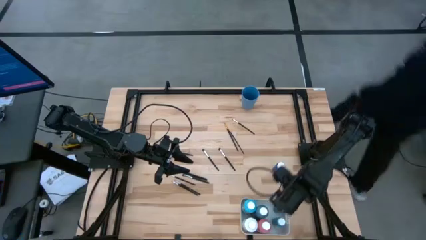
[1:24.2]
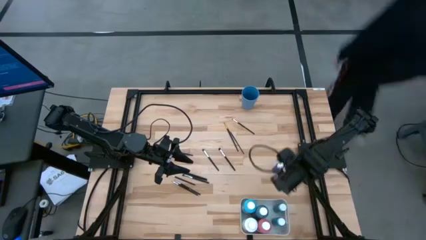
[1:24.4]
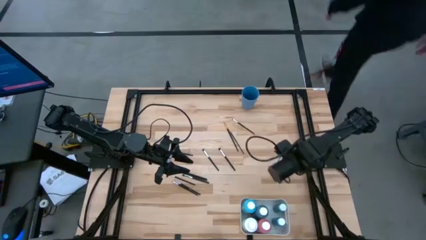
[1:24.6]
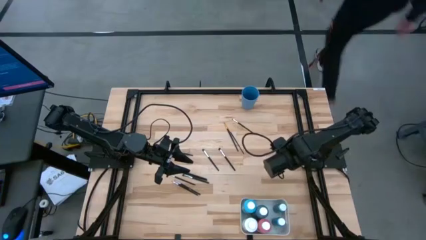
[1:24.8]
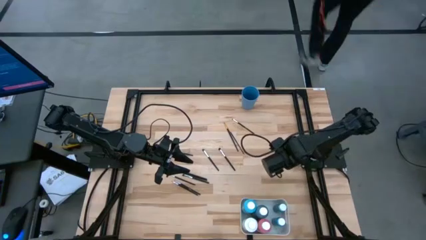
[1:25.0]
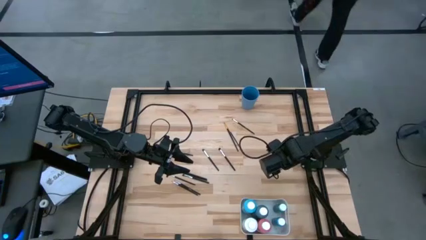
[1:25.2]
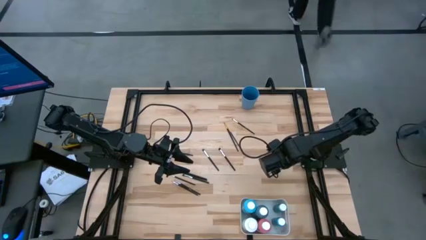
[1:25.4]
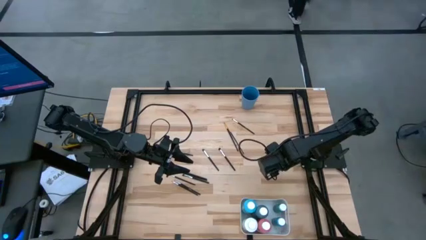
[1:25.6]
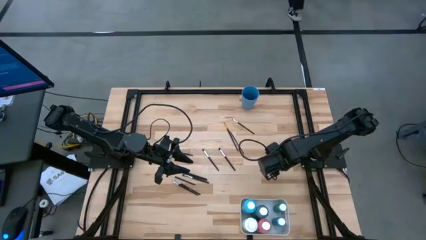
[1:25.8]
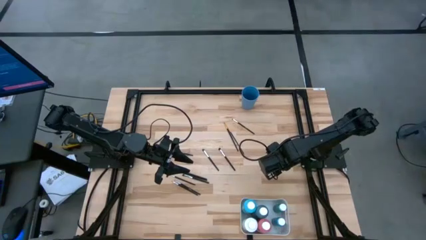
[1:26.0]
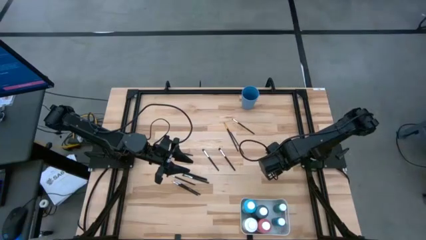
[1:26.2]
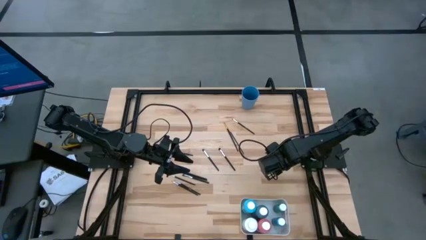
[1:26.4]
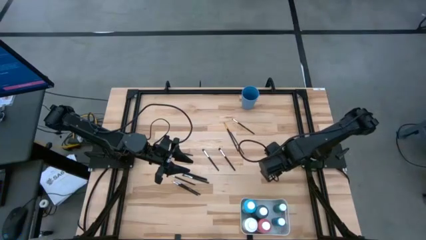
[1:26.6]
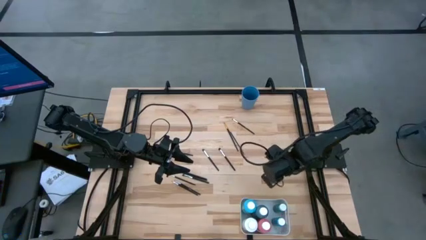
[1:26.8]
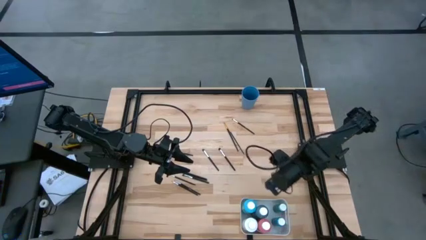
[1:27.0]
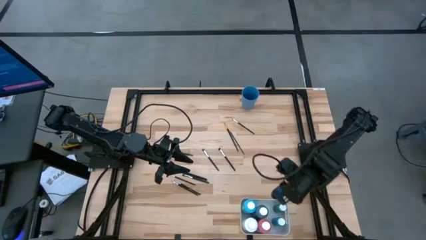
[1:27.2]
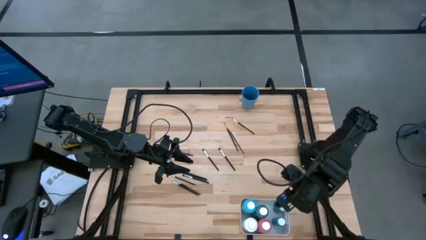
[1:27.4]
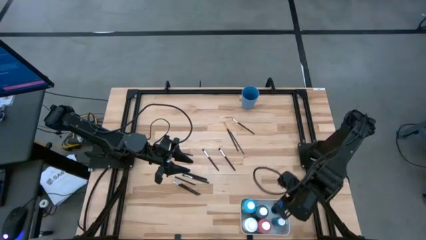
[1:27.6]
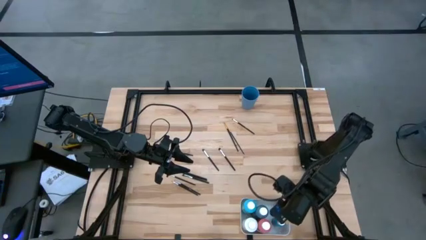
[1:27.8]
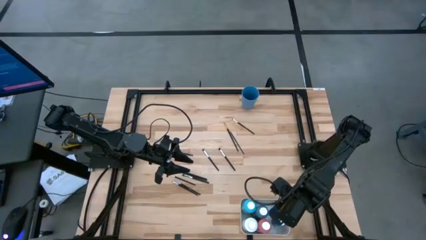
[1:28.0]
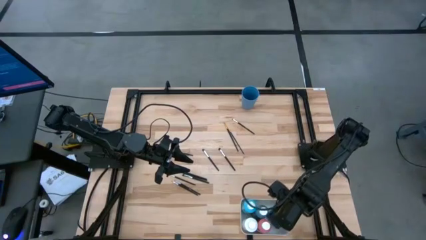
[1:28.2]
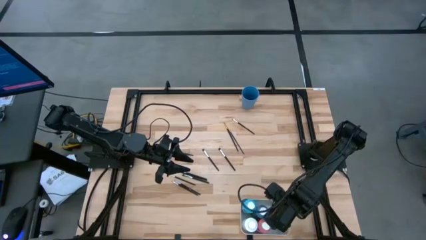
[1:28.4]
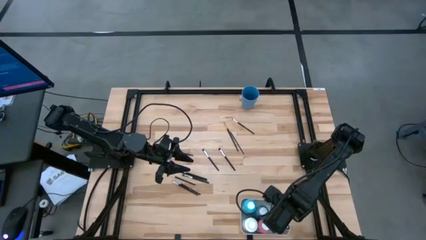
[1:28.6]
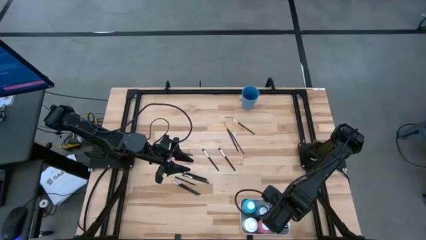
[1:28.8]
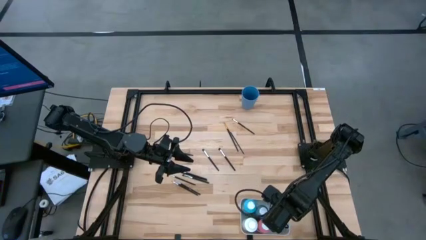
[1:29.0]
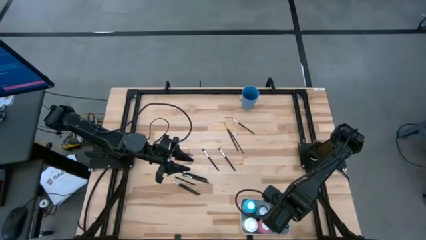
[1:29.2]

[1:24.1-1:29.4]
Task: Pick & Place Paint Supplies
Put the small blue paint bottle into the white bin

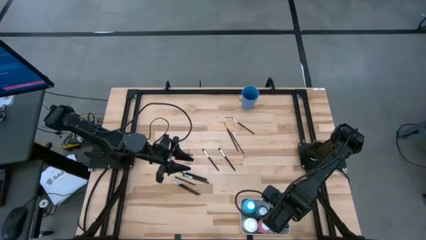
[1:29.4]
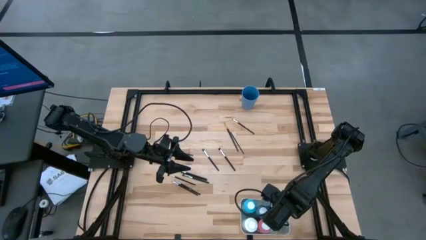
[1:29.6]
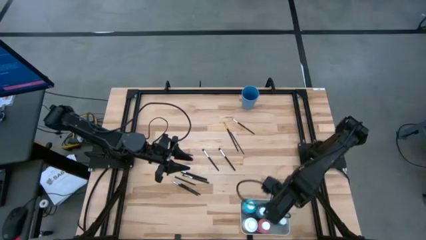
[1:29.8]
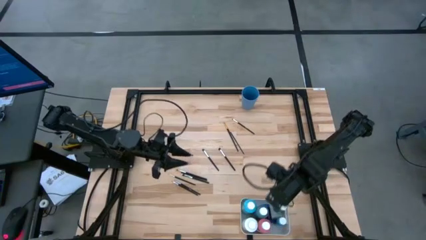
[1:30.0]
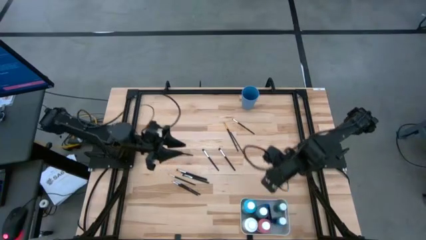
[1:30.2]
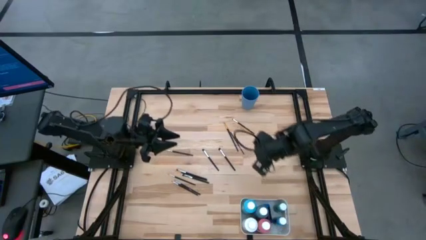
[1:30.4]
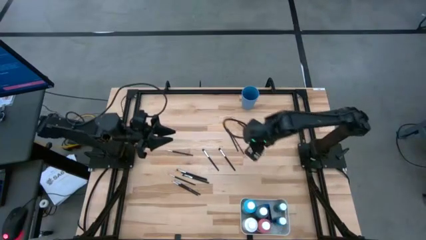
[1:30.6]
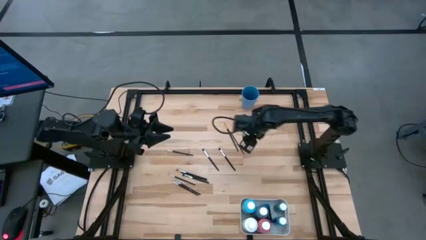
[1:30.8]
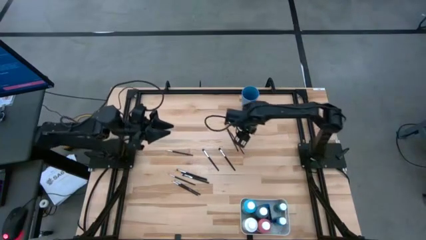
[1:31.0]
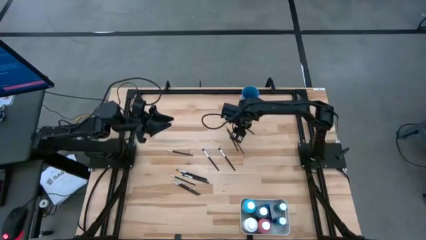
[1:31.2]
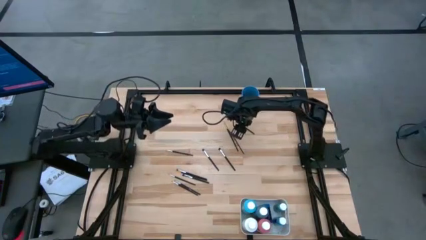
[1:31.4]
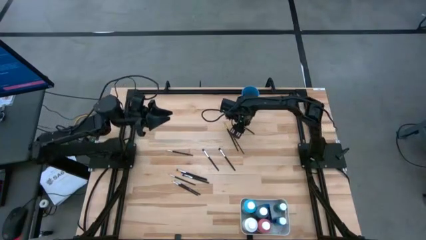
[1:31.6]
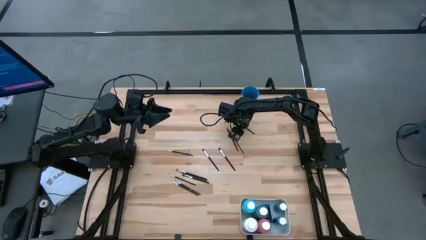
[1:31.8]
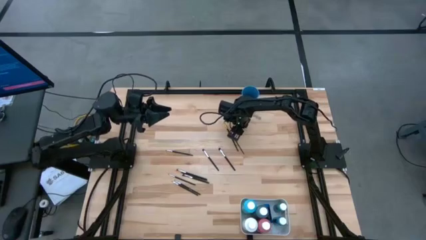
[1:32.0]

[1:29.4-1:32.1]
Put the silver paintbrush into the blue cup

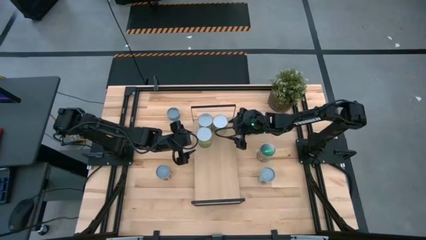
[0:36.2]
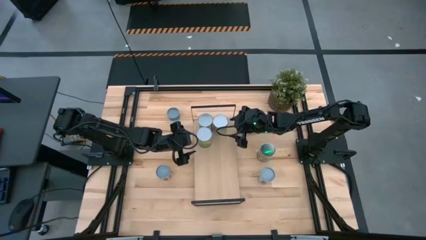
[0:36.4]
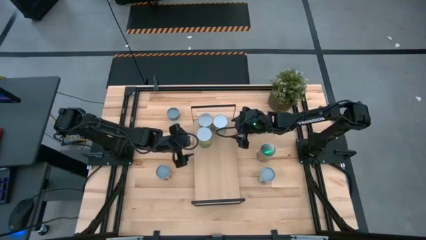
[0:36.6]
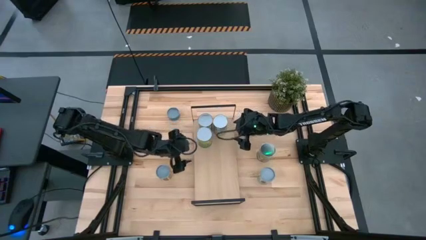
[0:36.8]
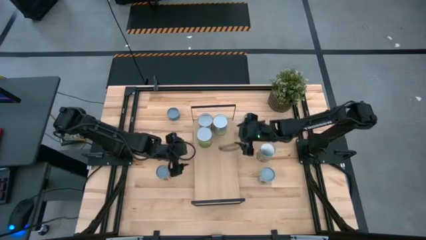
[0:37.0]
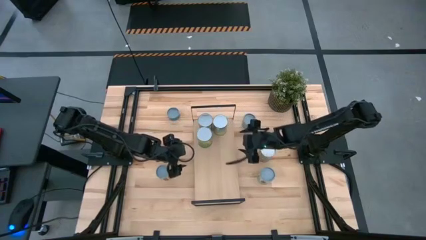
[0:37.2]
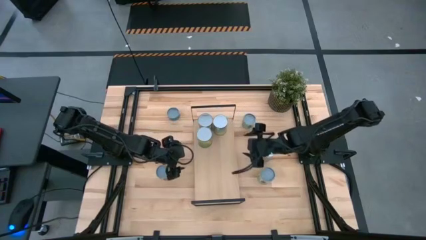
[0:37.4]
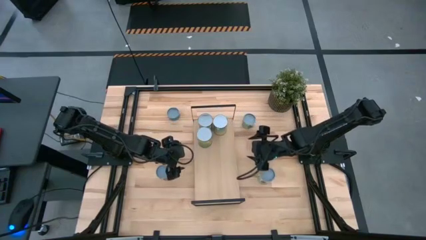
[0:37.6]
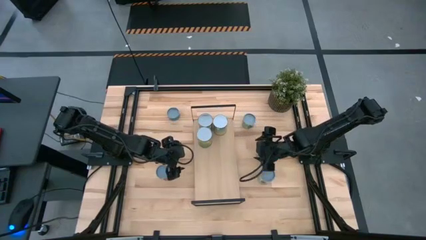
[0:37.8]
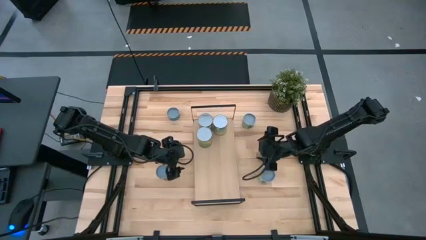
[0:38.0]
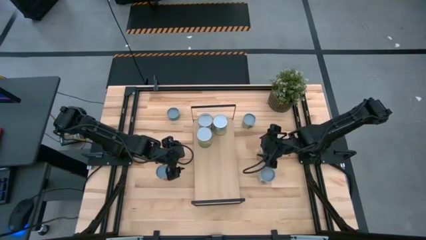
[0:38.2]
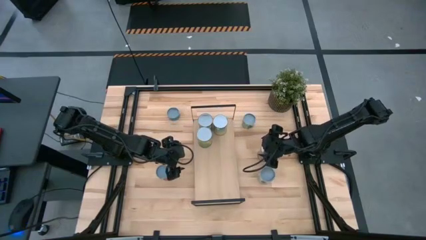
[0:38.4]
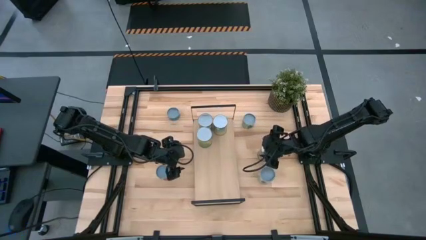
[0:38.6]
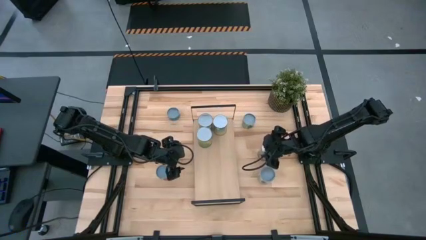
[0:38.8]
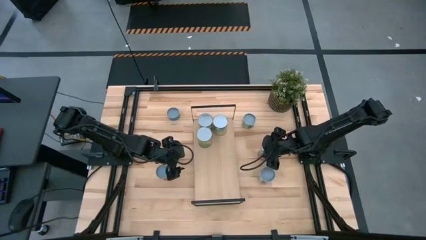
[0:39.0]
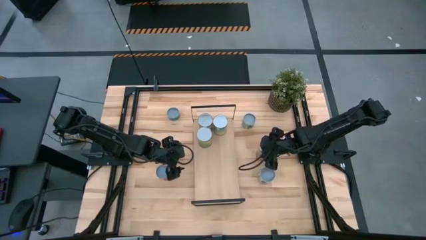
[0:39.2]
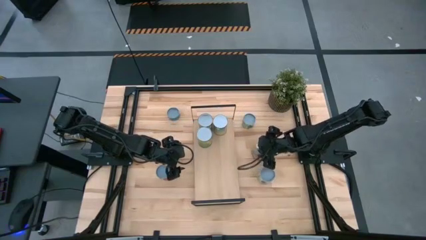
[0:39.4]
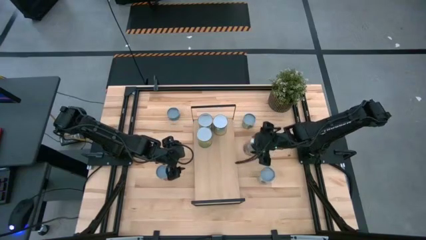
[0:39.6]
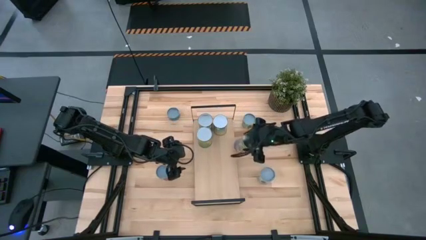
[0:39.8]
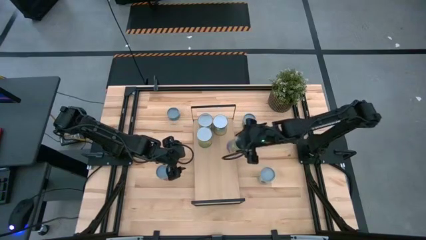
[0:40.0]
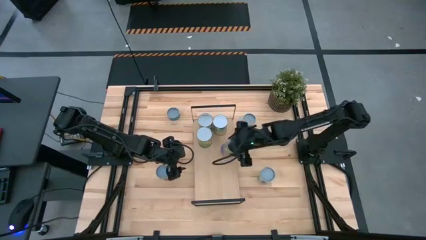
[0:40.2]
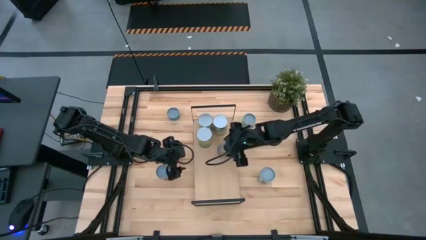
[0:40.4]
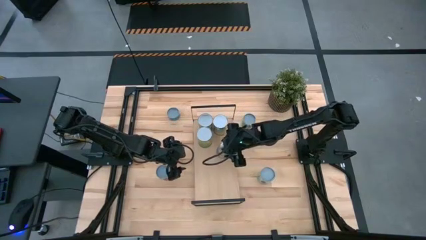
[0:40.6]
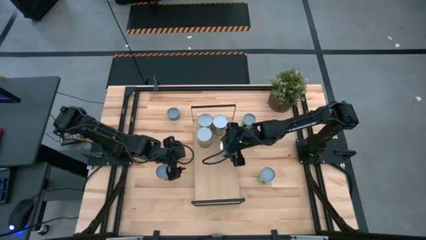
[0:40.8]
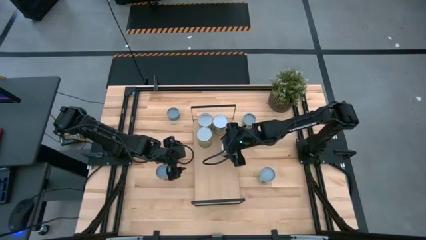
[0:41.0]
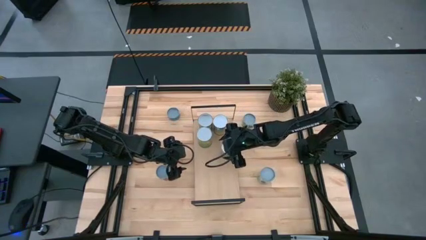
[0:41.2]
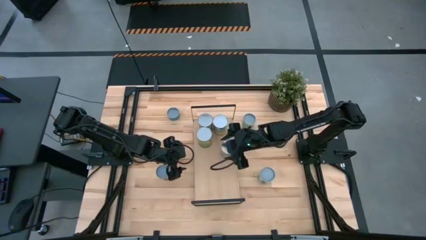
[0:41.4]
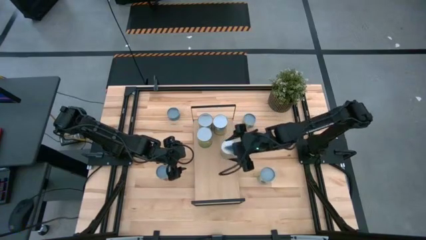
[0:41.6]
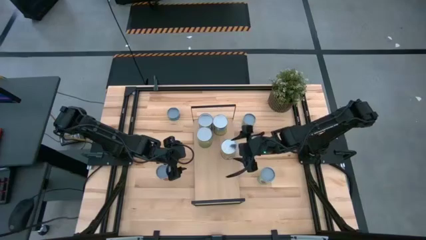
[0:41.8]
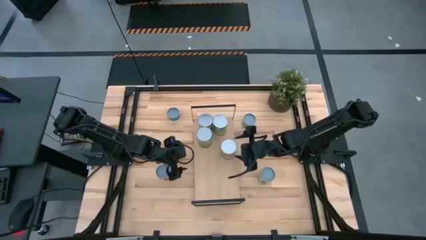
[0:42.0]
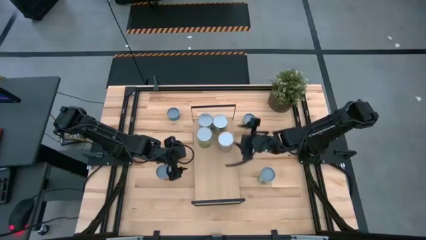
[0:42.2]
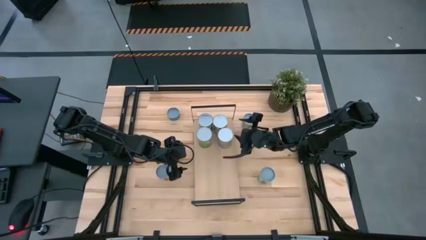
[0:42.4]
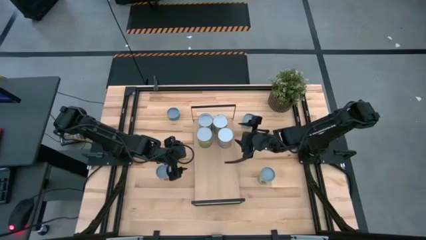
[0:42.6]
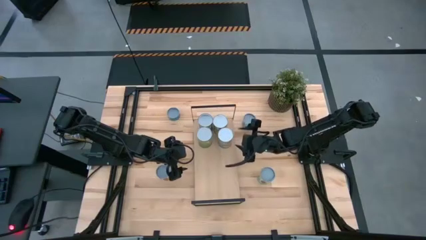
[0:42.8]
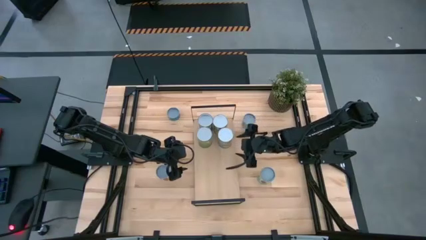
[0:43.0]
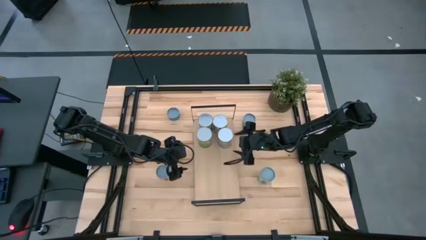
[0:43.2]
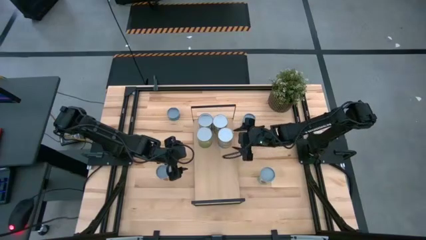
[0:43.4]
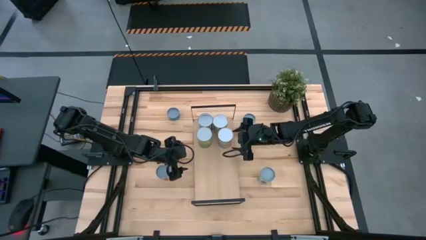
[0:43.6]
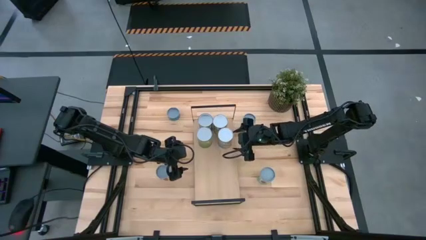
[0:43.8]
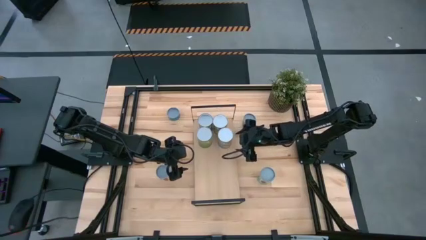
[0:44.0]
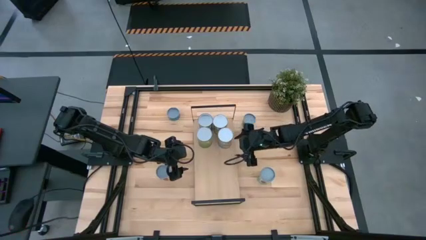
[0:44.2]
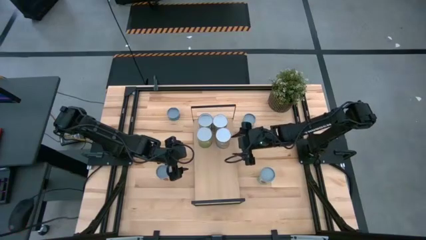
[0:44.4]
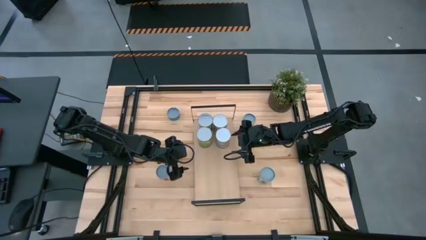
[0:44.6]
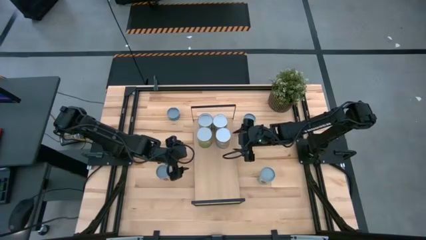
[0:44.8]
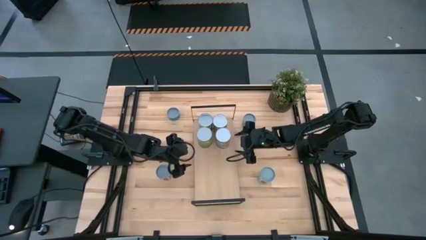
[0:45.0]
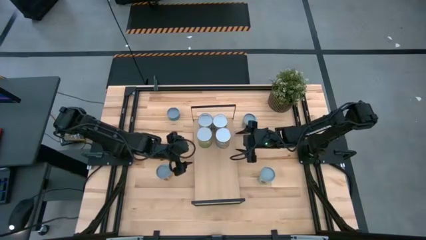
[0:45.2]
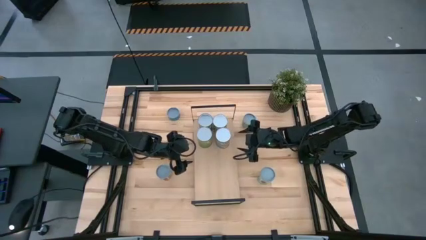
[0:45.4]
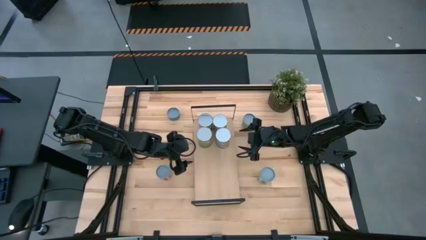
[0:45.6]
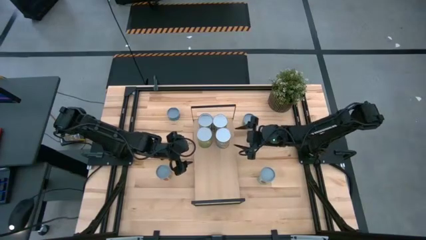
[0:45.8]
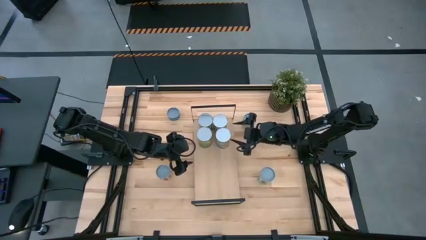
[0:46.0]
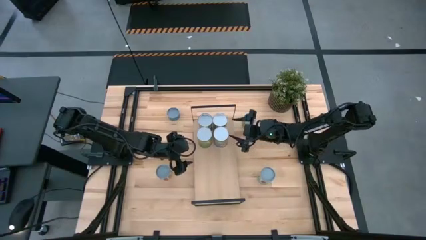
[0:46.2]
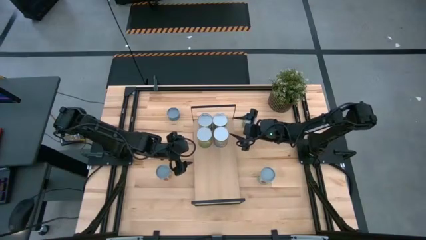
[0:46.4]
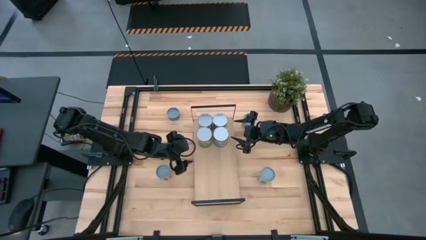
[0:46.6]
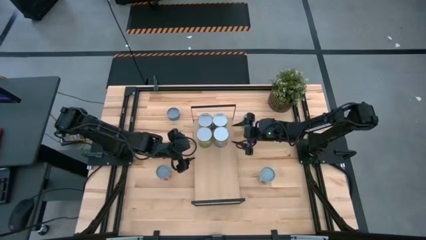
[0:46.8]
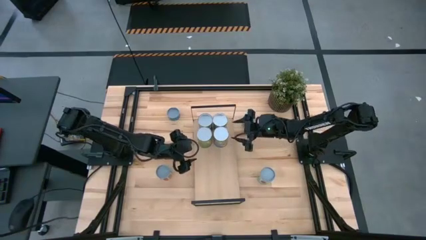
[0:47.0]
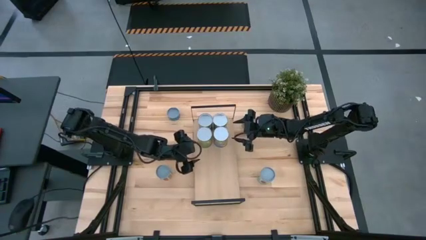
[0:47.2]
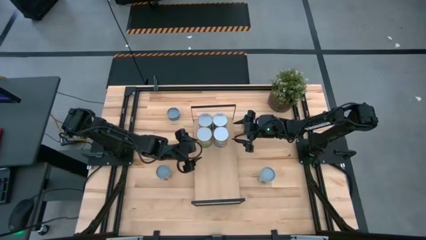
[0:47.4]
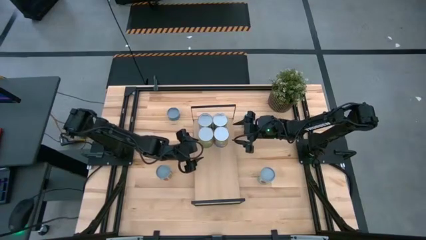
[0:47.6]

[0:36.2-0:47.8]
Task: Pick and place cans onto a shelf
Put the canned peaches on the shelf
